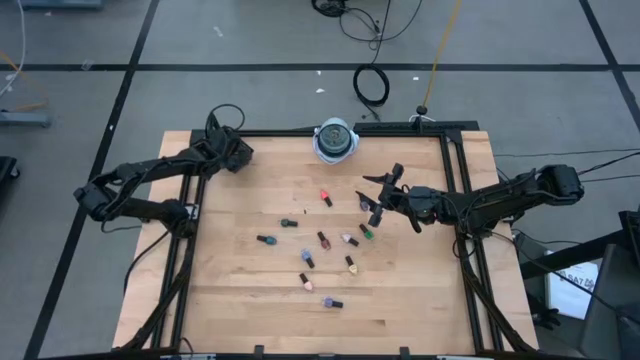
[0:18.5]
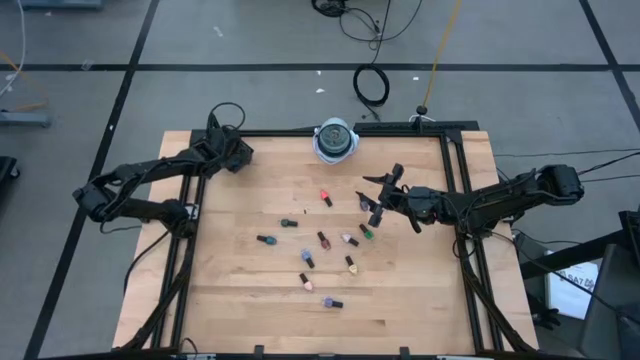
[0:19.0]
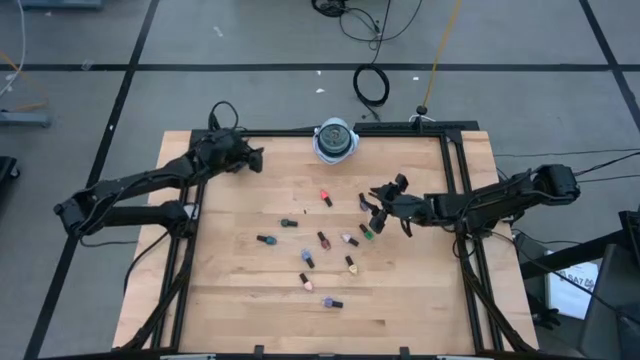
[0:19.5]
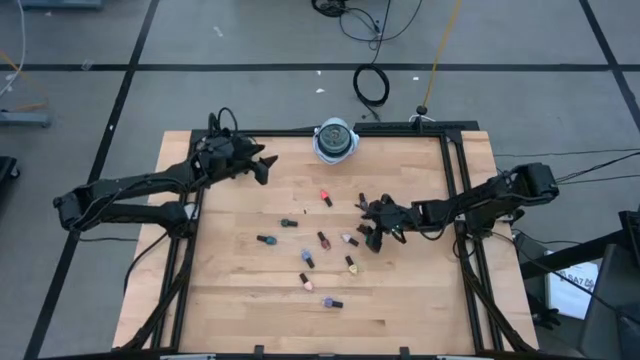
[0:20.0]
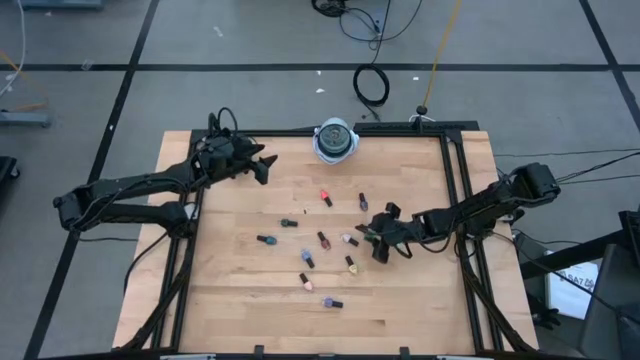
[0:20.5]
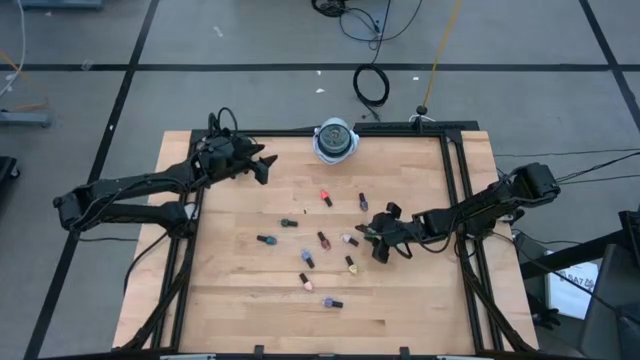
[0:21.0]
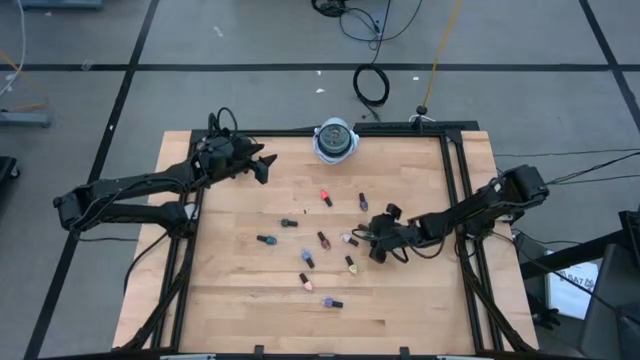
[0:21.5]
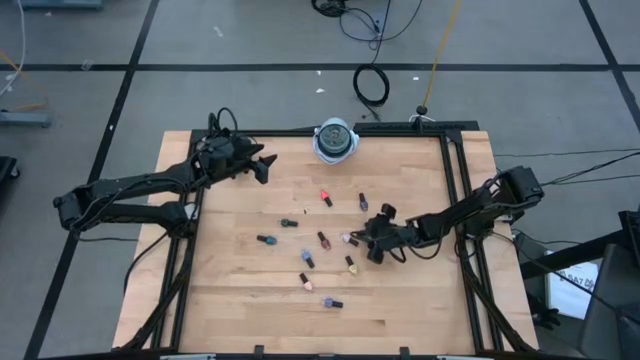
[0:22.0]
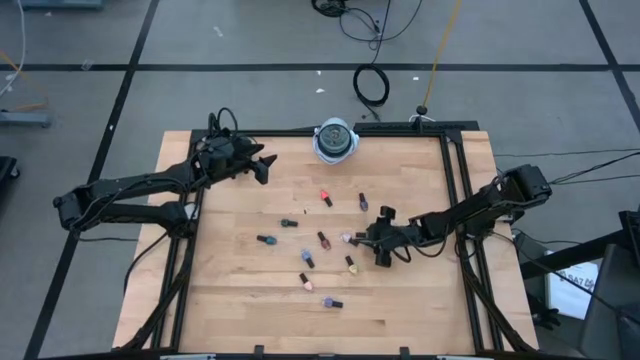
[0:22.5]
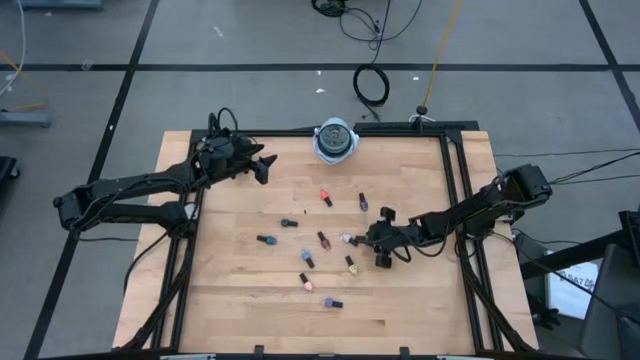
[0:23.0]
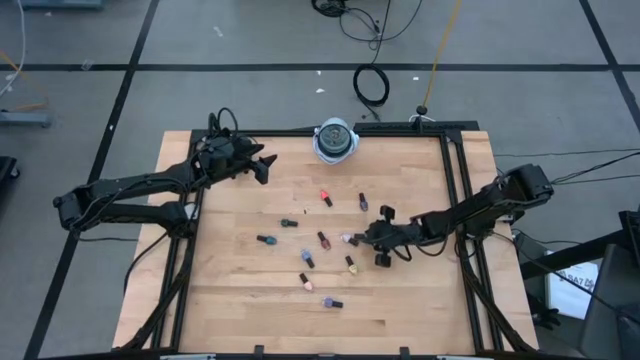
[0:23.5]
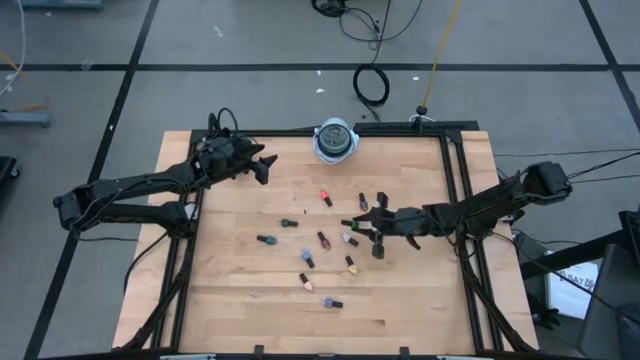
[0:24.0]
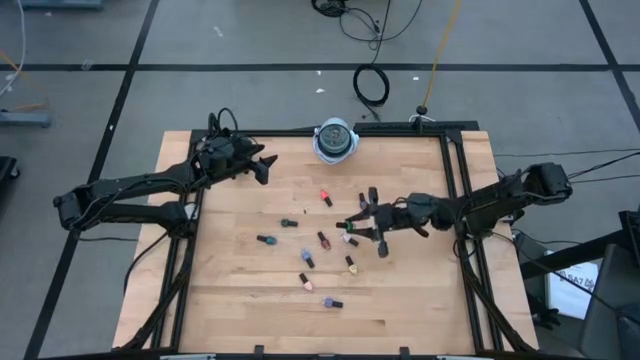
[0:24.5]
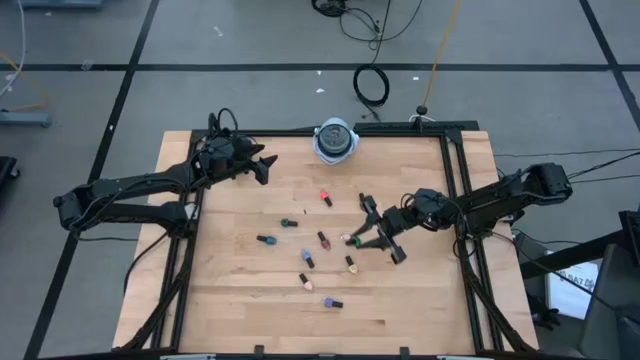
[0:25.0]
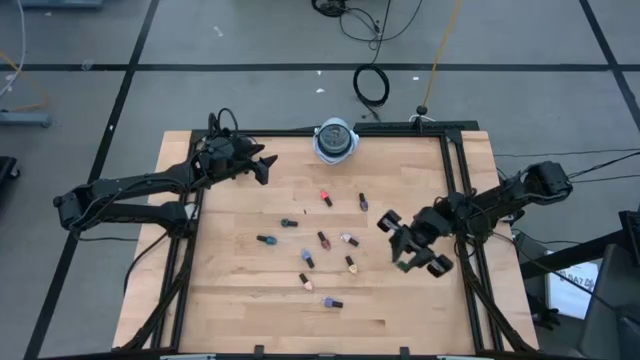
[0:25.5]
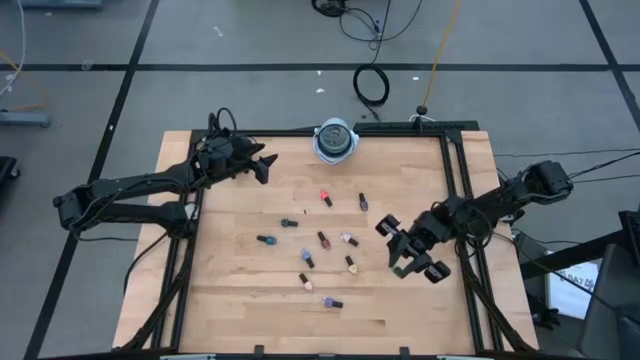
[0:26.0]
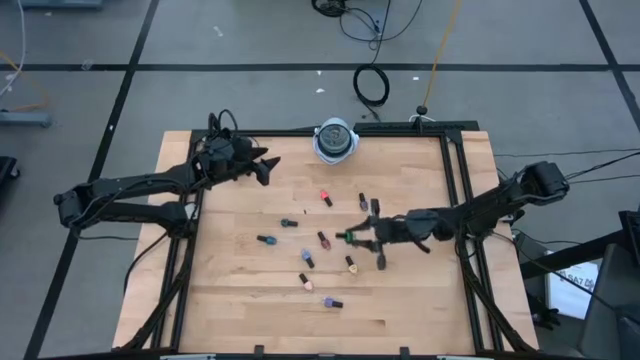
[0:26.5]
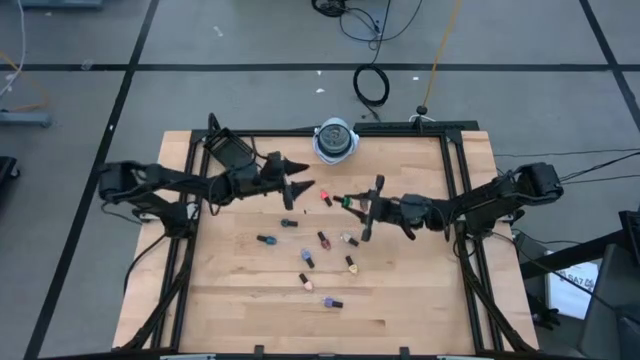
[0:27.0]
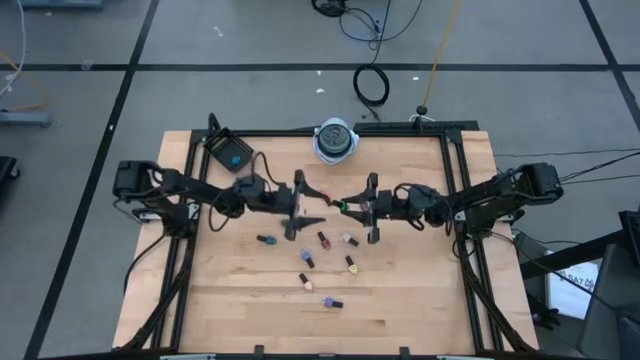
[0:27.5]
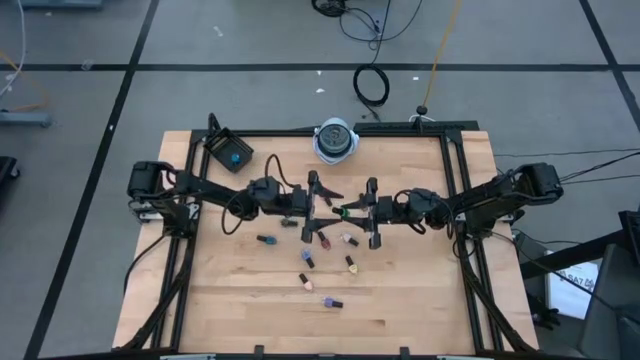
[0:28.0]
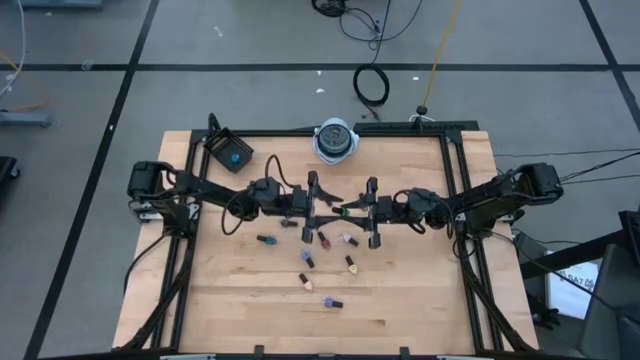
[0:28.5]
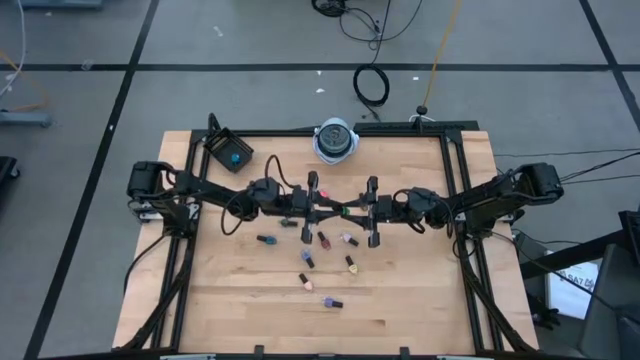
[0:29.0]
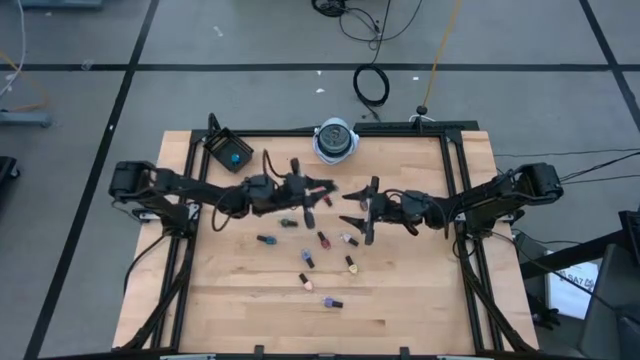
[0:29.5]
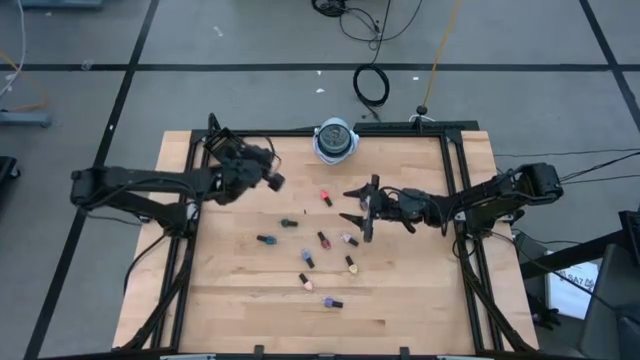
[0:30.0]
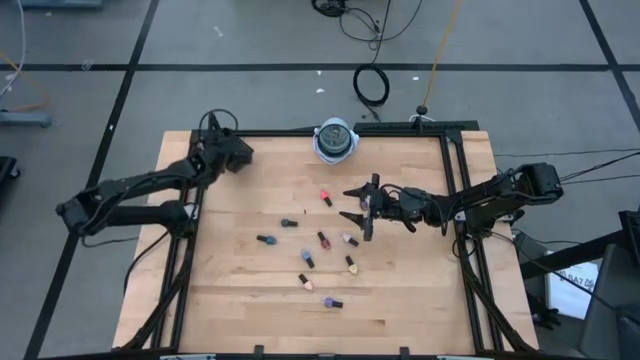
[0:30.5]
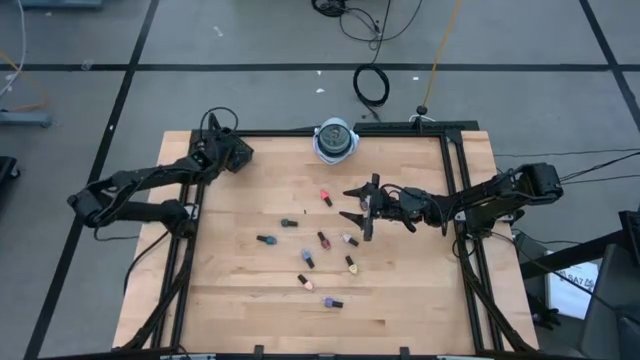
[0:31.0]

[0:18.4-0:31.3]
Task: Pick & Place Nail Polish
Put the green nail polish bottle into the black bin

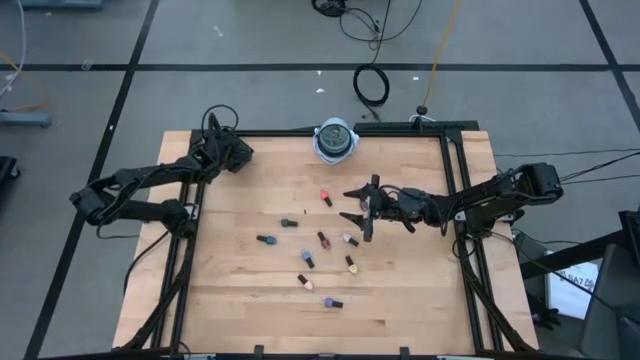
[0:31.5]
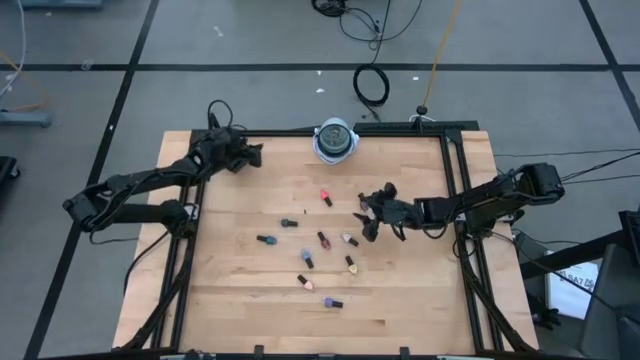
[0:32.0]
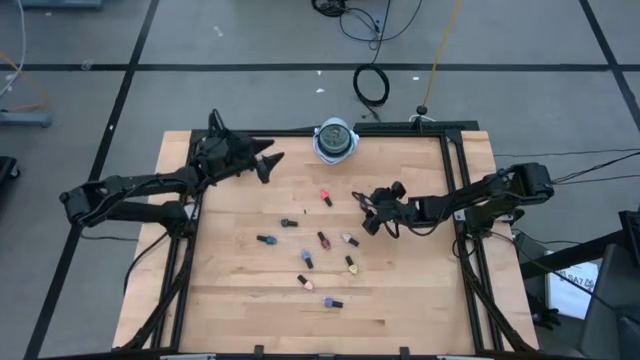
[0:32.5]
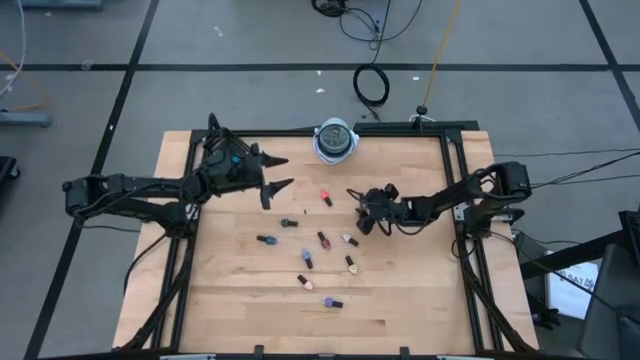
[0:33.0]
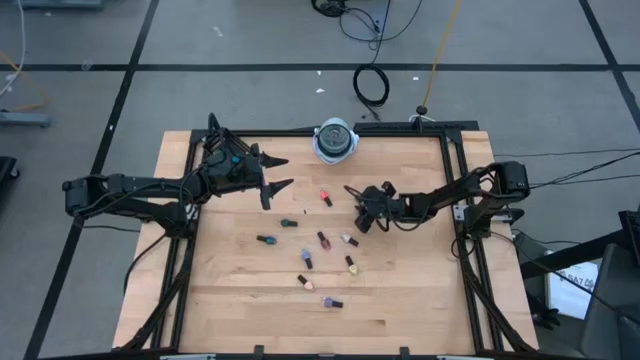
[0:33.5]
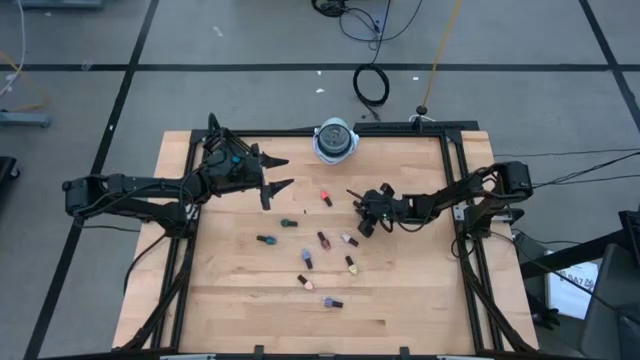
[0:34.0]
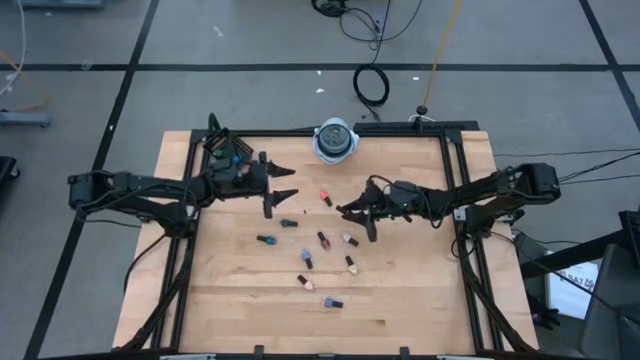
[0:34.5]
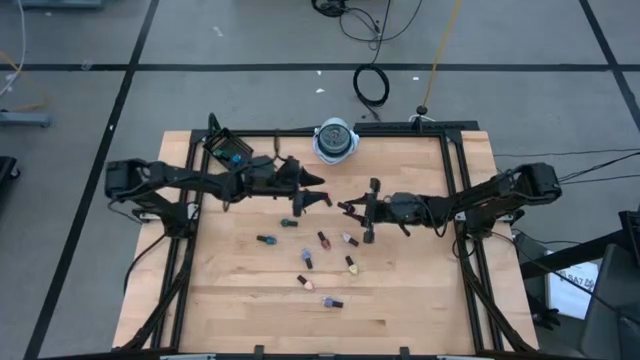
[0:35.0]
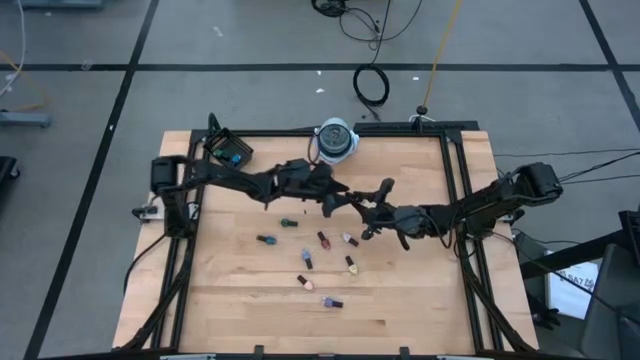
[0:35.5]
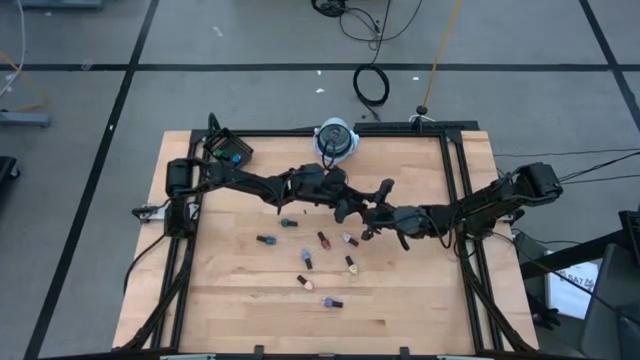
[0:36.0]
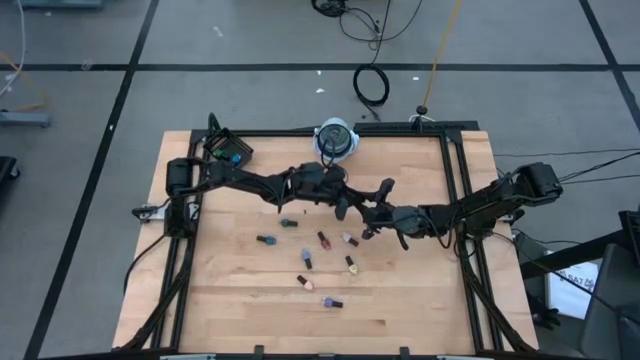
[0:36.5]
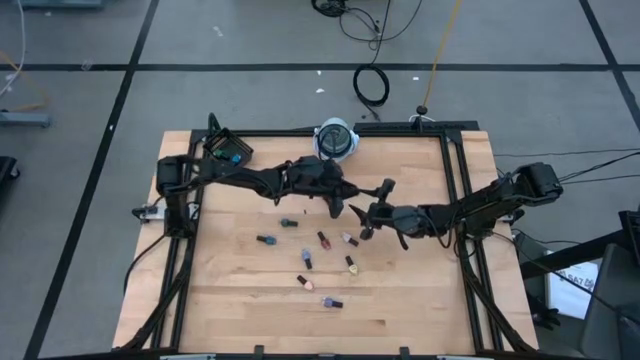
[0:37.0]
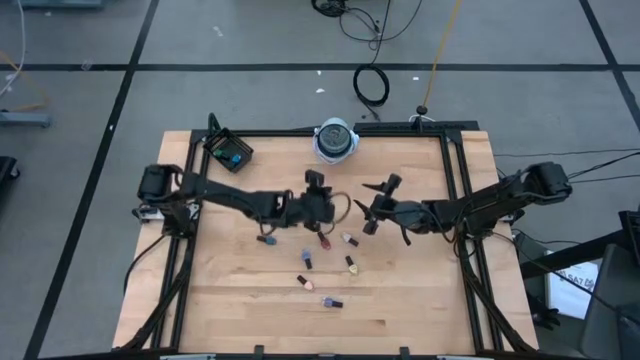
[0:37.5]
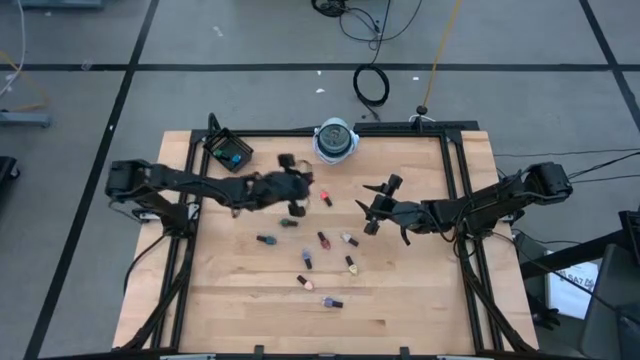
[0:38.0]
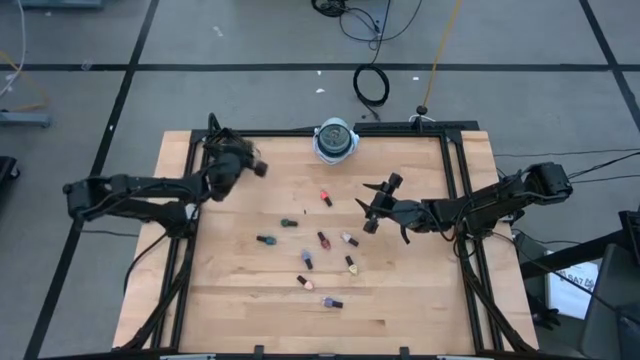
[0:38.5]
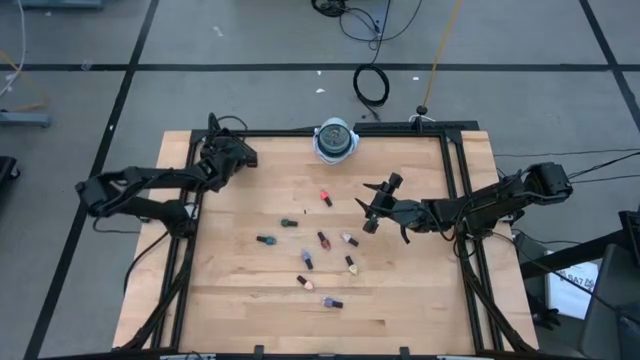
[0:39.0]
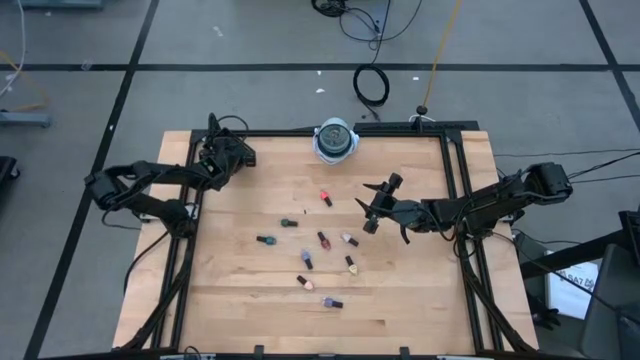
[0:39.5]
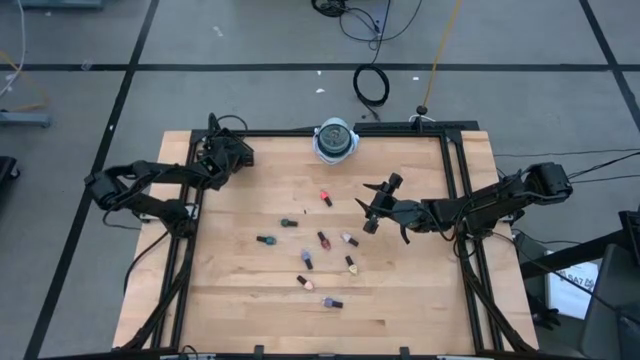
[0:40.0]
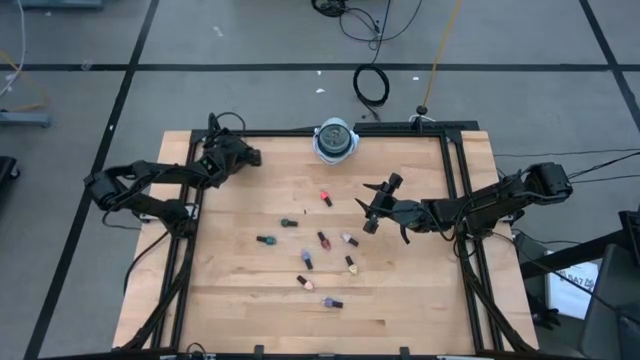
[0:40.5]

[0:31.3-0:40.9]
Put the dark violet nail polish bottle into the black bin
